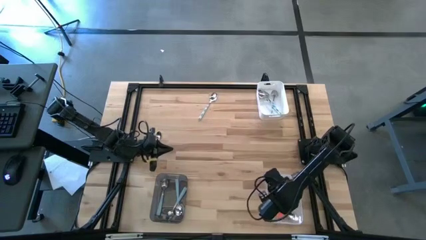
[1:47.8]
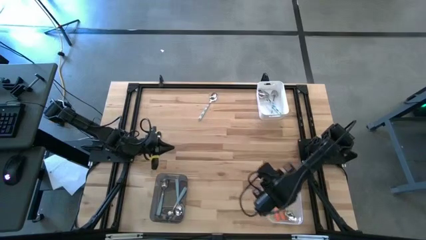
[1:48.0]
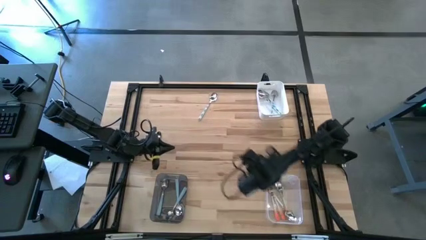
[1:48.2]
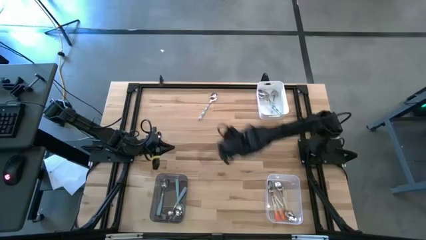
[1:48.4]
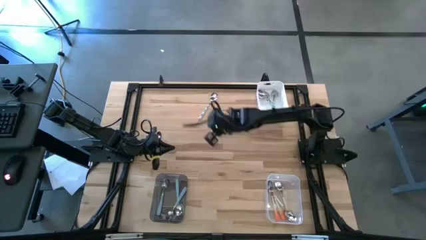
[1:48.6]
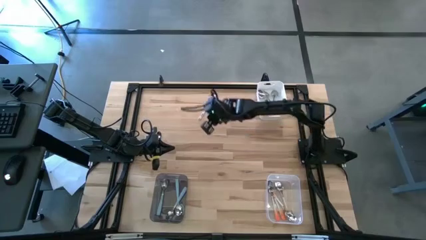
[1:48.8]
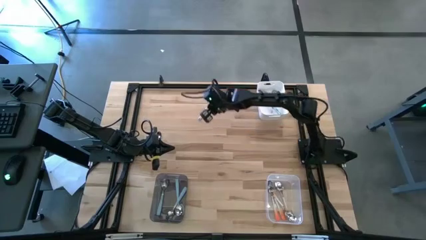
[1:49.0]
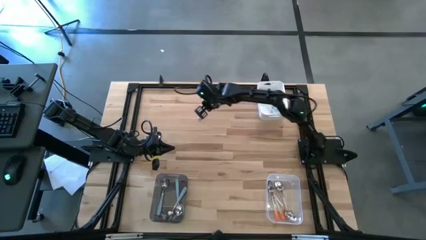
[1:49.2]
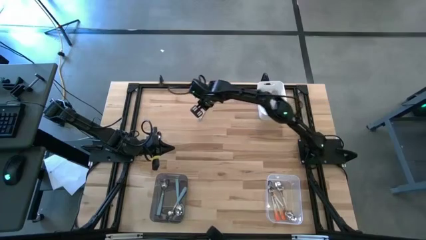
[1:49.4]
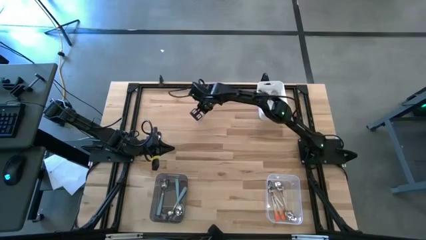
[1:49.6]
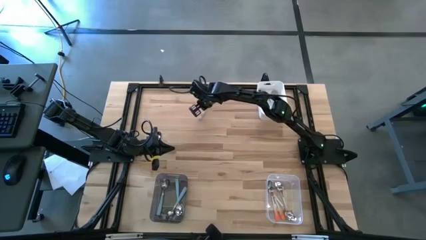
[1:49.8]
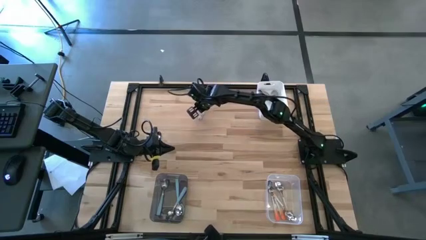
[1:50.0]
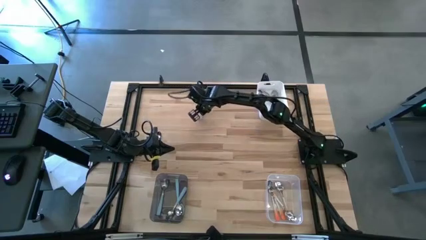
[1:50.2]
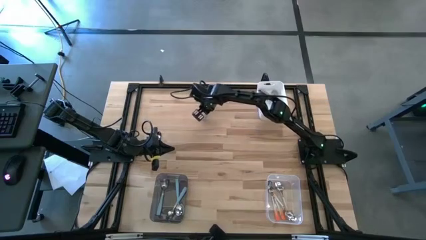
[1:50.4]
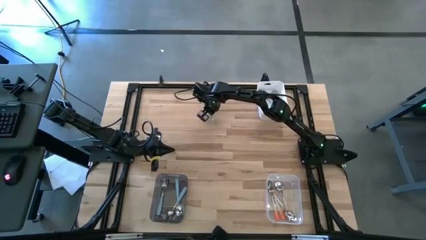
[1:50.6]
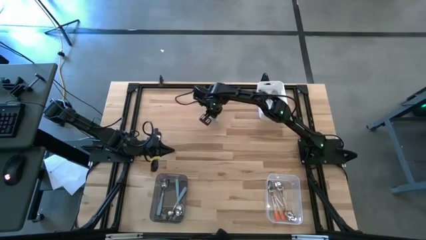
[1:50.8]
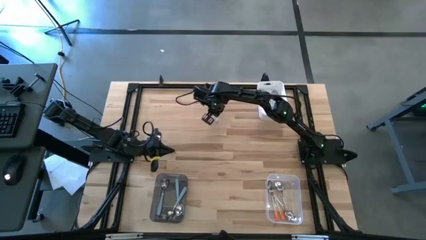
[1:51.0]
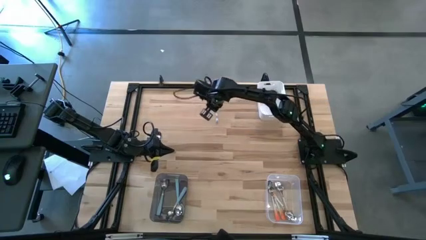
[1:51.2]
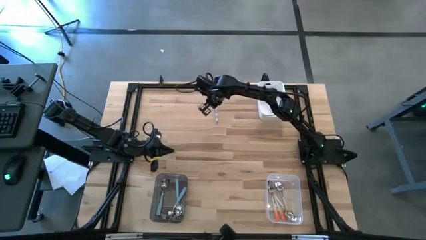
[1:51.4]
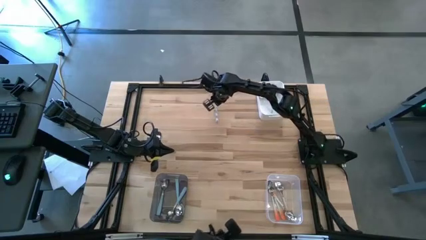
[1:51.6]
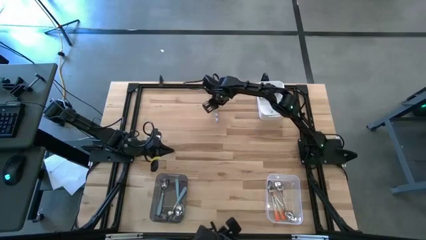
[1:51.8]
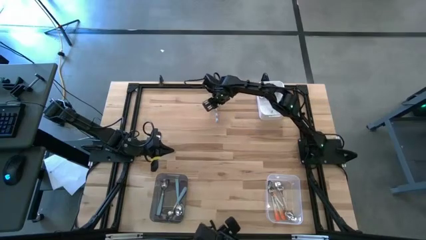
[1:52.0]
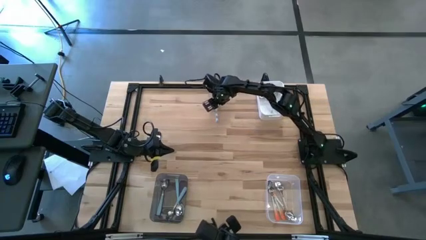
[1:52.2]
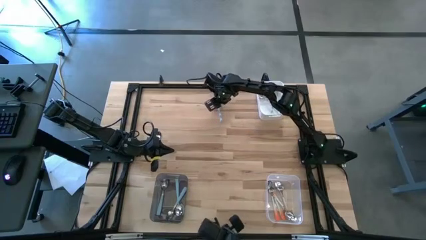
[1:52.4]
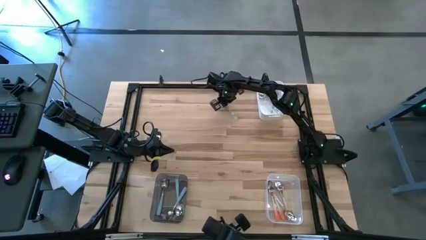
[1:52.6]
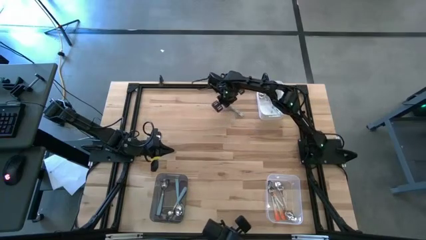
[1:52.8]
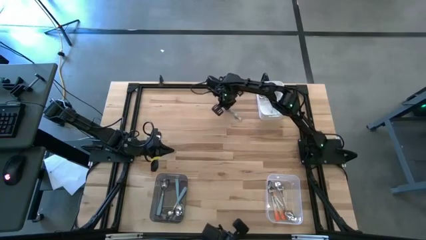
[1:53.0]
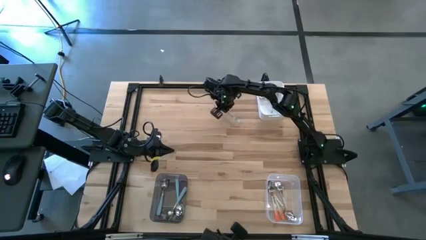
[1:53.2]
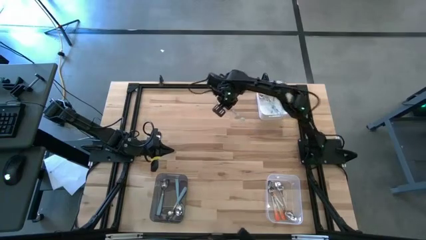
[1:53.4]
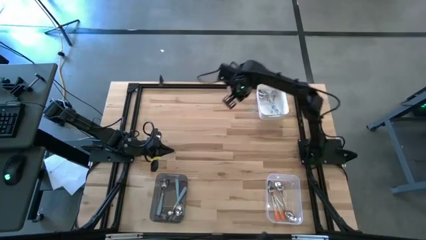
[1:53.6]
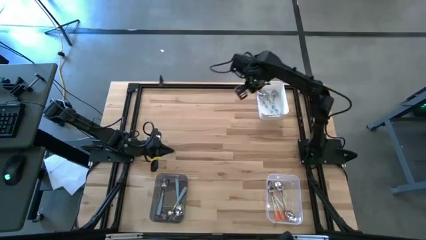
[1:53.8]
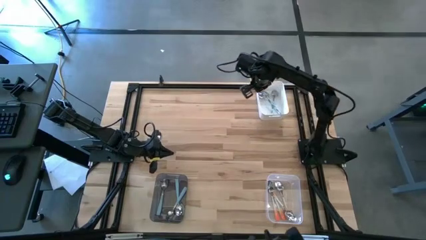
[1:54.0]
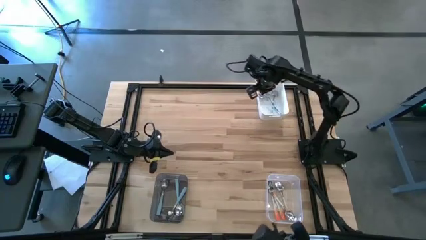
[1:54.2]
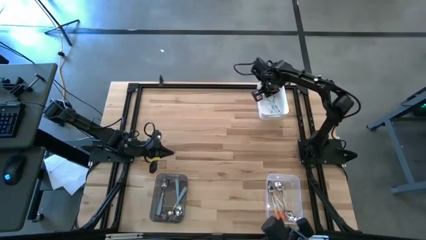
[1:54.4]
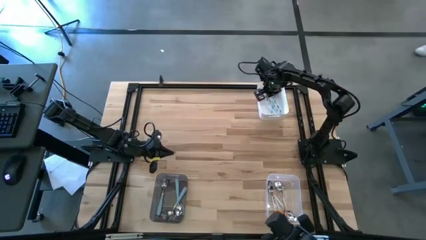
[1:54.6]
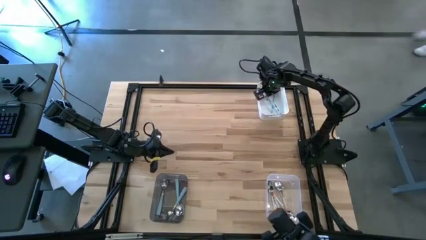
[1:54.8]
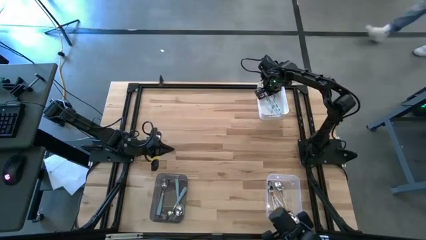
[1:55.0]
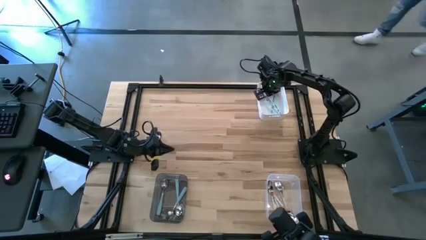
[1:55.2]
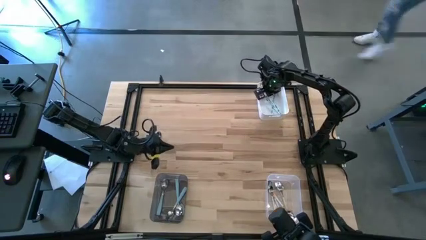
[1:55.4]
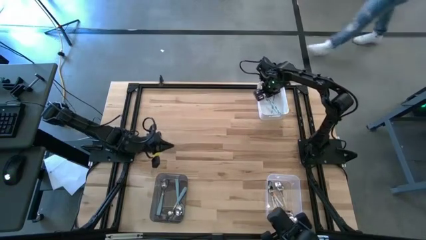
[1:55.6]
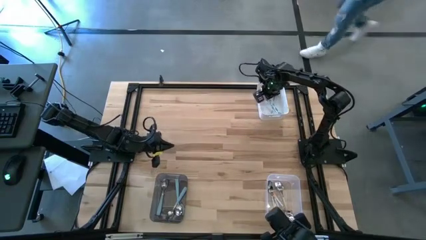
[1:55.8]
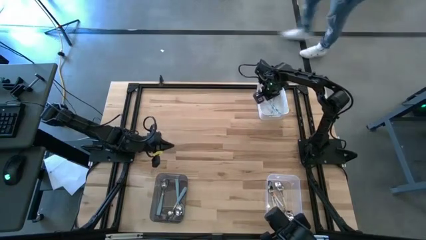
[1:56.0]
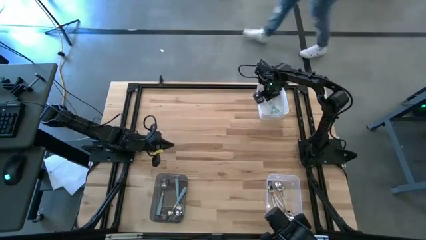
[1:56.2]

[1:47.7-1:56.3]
Task: Sort silverware by color (type)
Put the top white spoon into the white bin

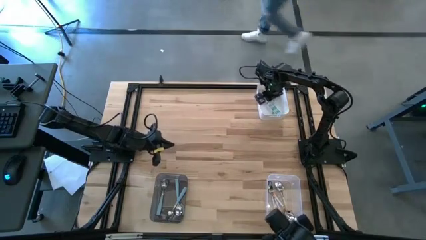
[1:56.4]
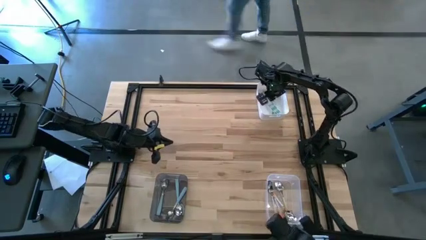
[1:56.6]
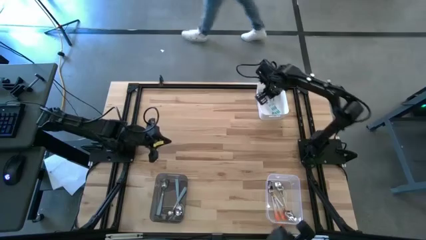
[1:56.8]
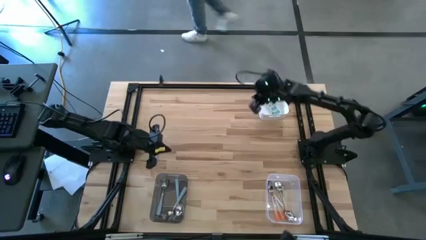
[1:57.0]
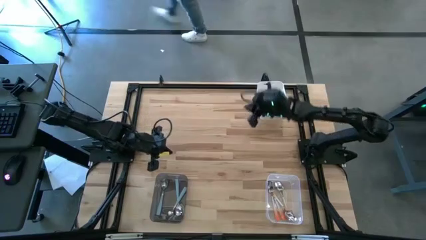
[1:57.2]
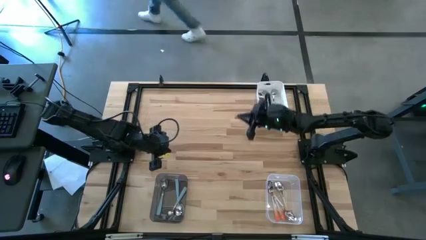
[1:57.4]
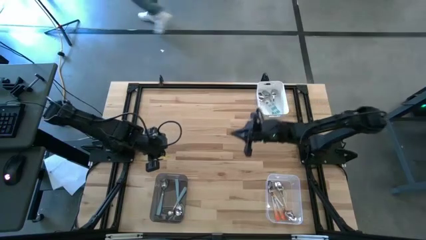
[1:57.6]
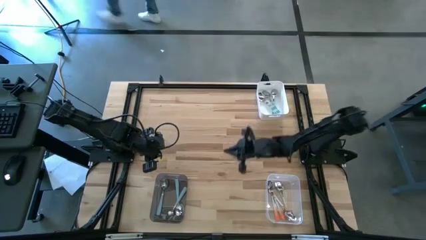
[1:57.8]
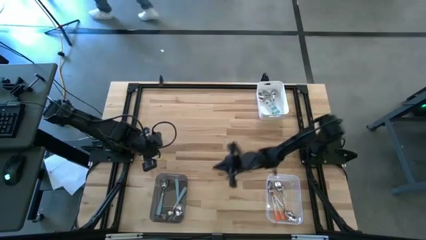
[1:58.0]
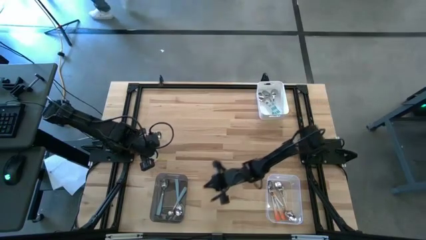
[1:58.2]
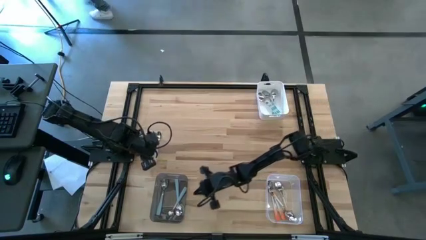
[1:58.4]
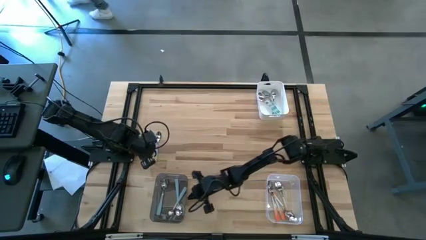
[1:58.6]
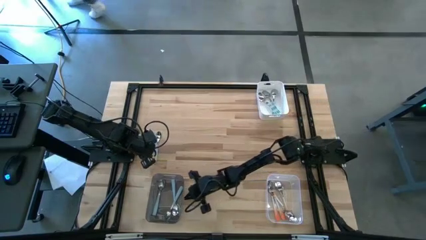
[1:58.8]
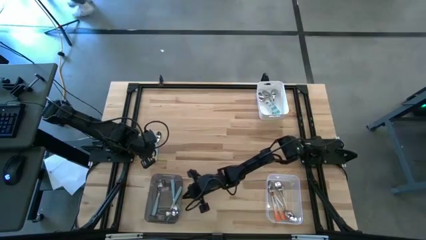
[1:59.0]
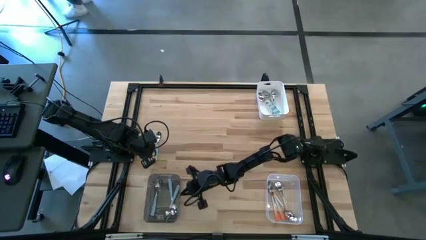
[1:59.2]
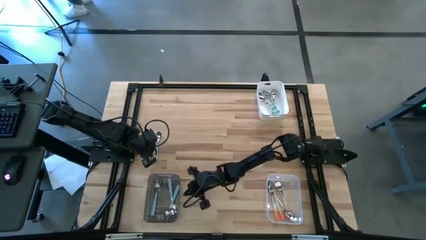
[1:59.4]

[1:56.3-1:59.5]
Adjust the black bin

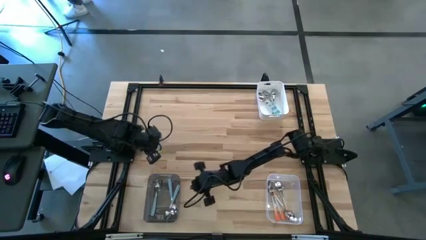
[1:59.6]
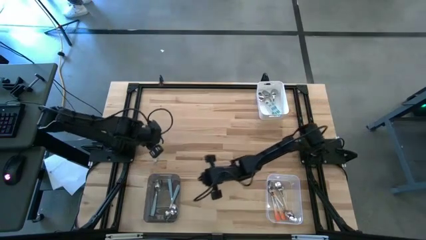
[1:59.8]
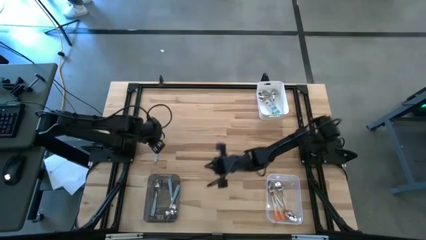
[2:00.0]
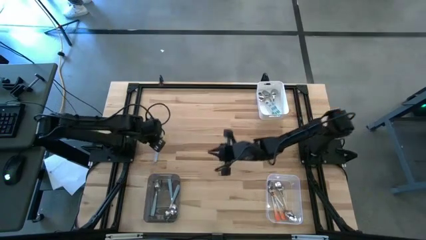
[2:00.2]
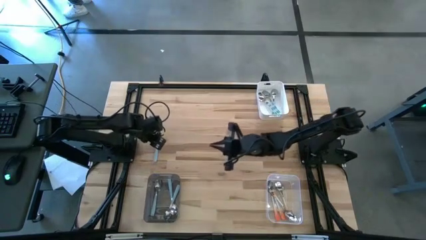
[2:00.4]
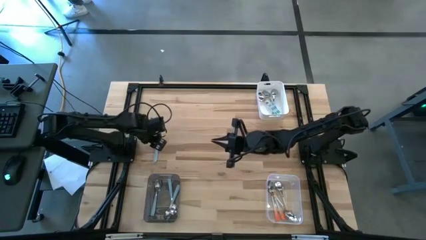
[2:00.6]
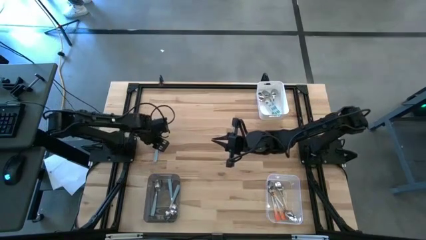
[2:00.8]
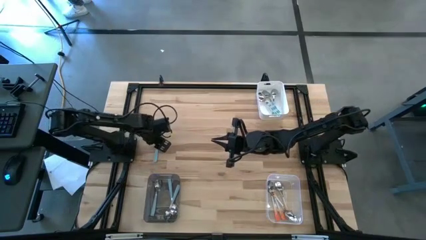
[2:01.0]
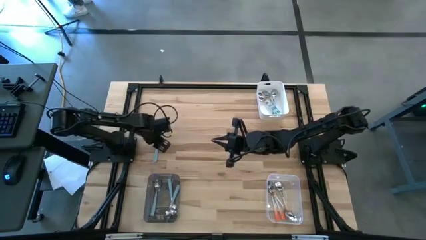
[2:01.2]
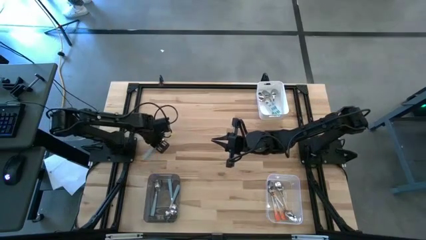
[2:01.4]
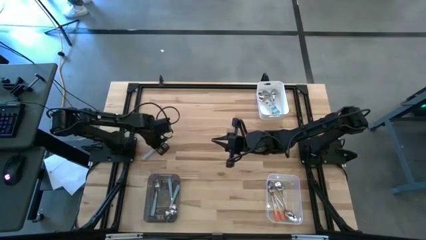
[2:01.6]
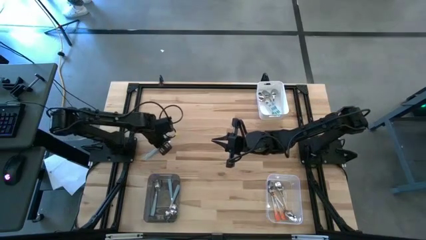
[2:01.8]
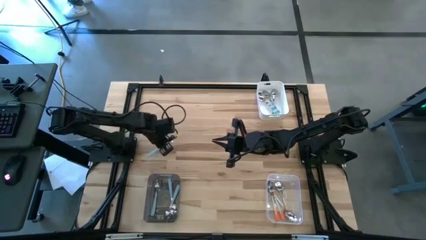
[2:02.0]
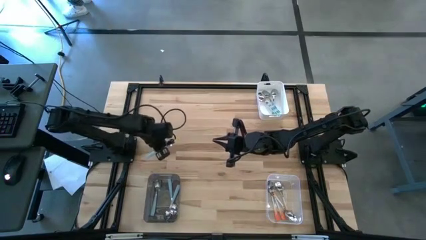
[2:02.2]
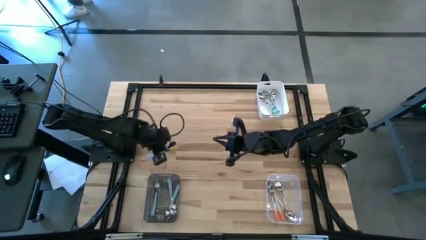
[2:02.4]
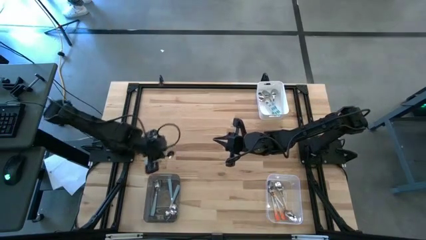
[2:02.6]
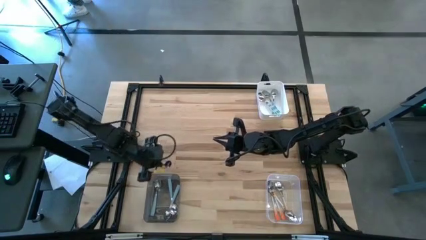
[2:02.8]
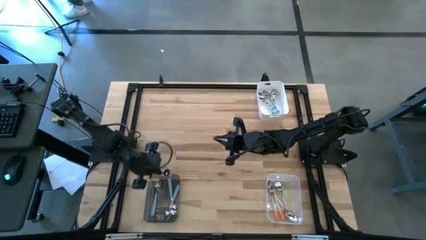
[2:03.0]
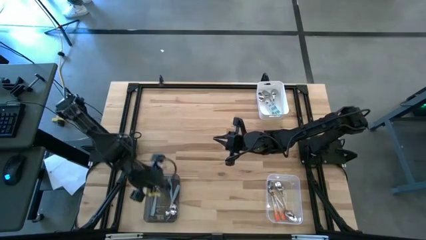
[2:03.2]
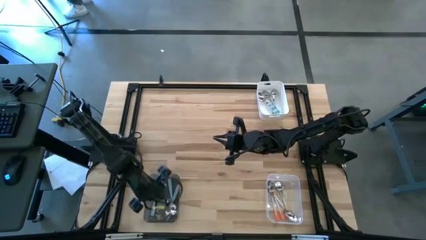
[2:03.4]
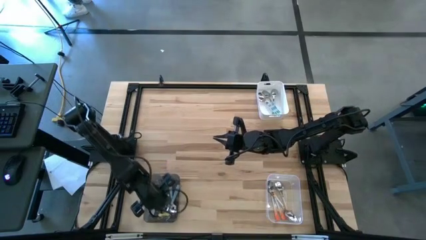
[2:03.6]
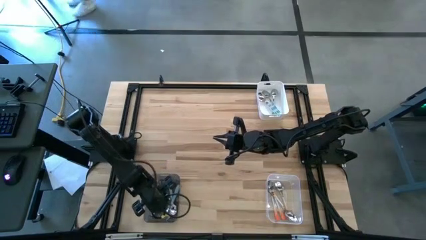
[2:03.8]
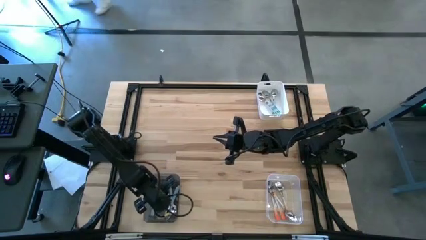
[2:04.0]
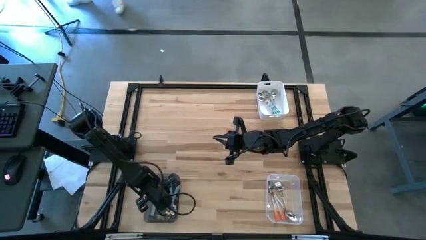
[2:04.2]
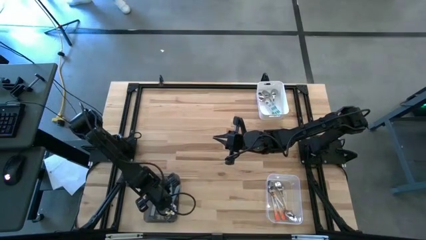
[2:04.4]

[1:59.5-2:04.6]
Put the top light blue spoon into the black bin
